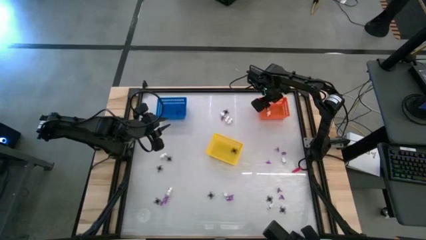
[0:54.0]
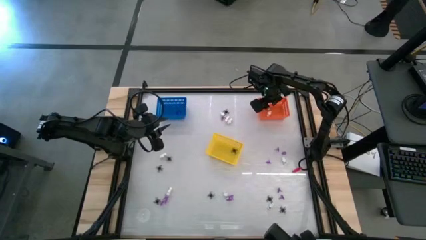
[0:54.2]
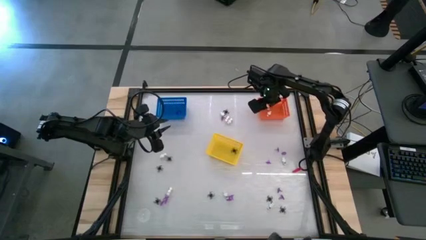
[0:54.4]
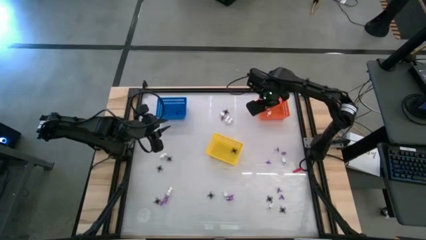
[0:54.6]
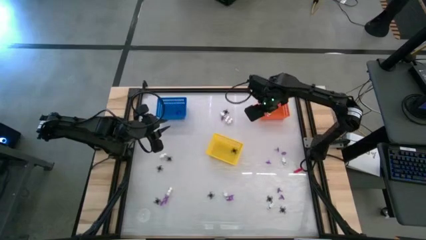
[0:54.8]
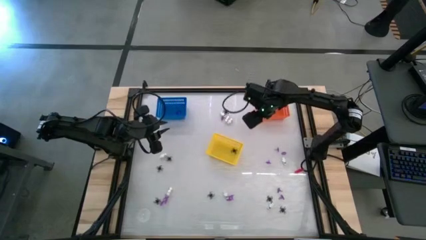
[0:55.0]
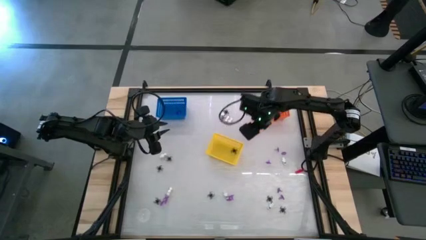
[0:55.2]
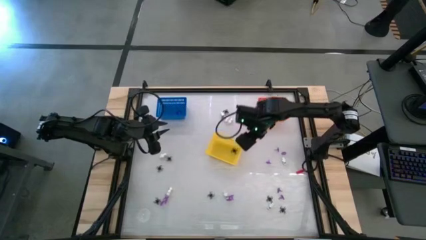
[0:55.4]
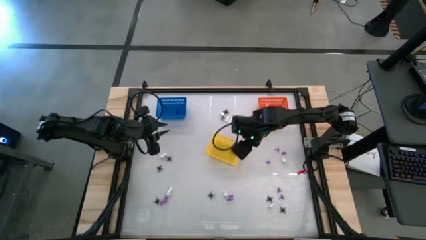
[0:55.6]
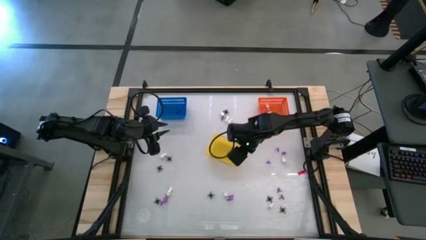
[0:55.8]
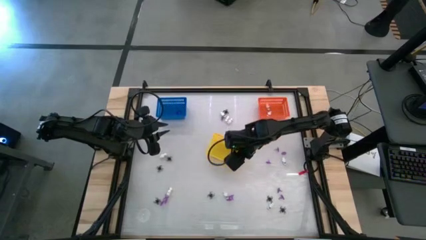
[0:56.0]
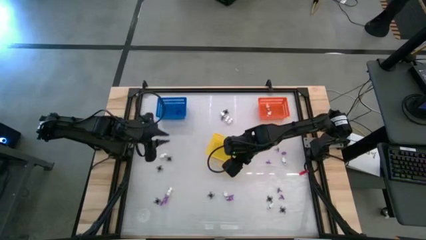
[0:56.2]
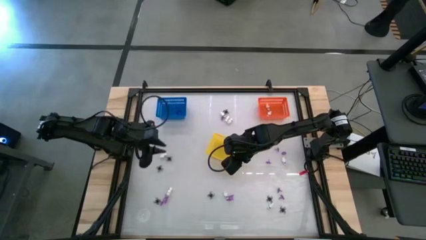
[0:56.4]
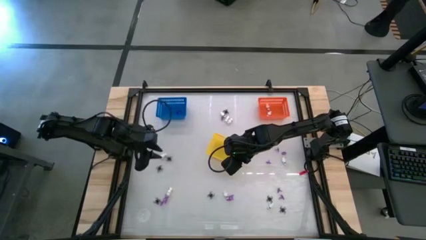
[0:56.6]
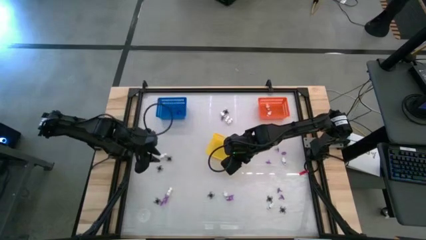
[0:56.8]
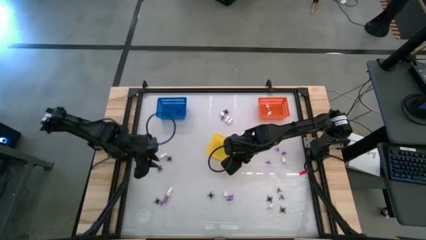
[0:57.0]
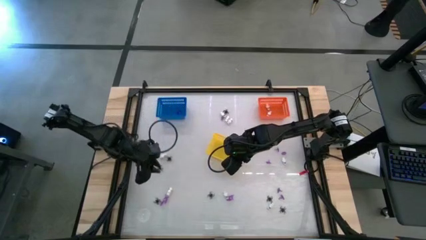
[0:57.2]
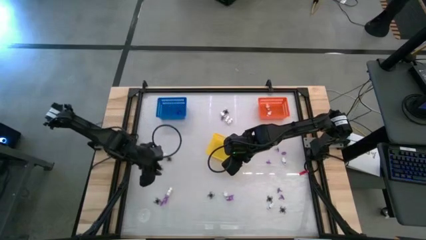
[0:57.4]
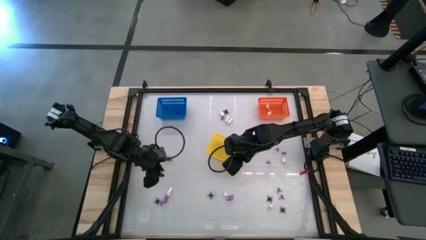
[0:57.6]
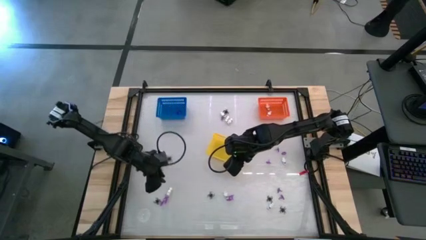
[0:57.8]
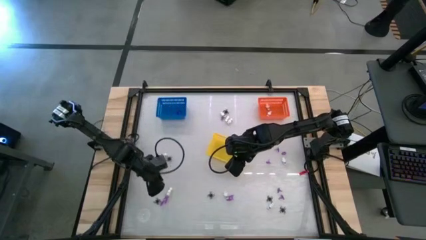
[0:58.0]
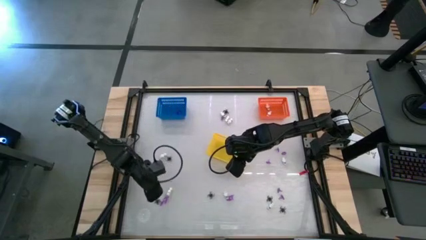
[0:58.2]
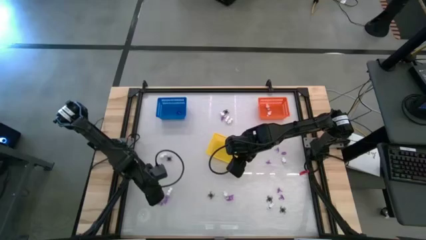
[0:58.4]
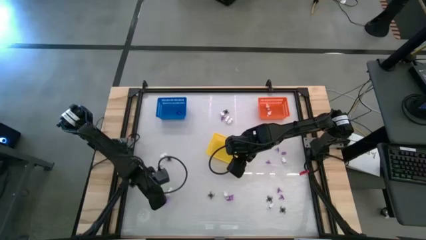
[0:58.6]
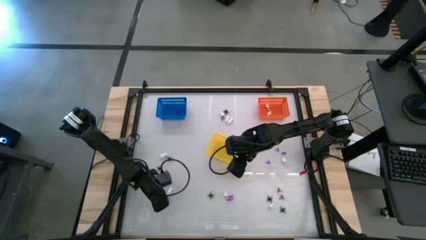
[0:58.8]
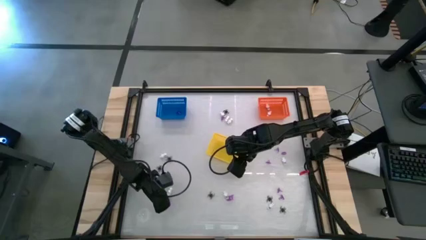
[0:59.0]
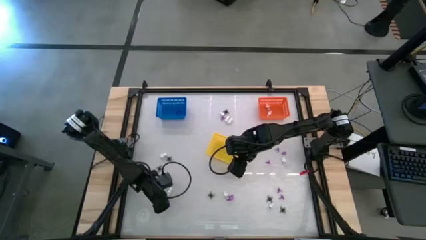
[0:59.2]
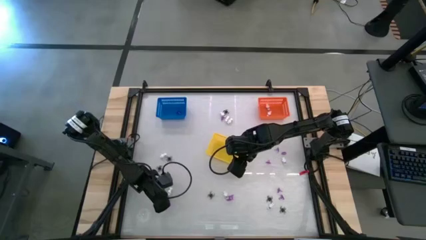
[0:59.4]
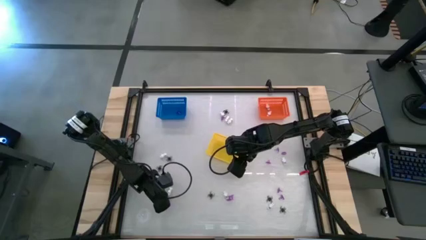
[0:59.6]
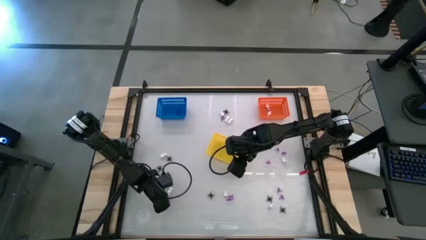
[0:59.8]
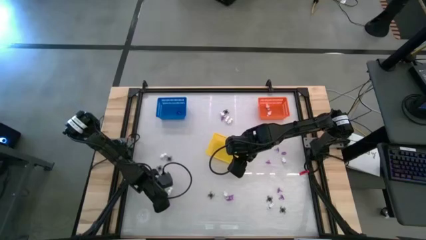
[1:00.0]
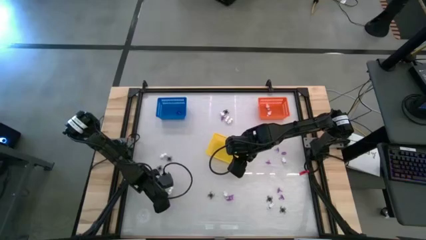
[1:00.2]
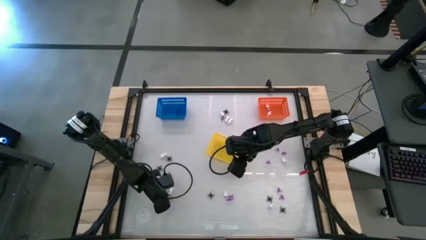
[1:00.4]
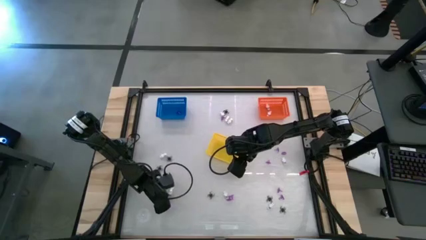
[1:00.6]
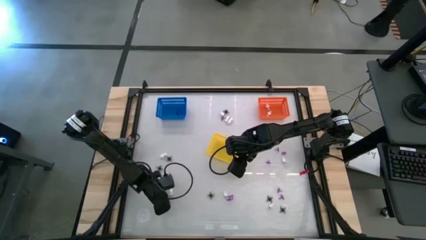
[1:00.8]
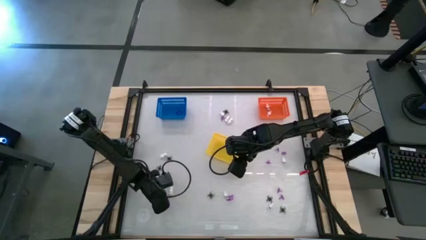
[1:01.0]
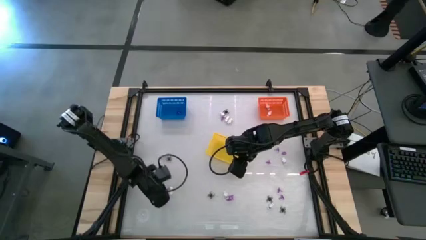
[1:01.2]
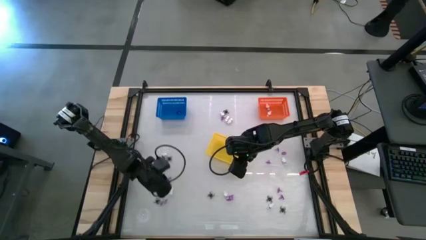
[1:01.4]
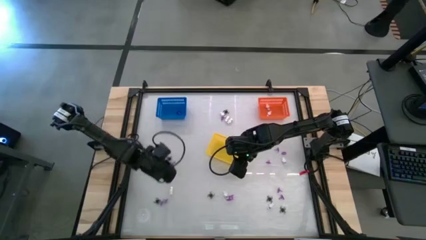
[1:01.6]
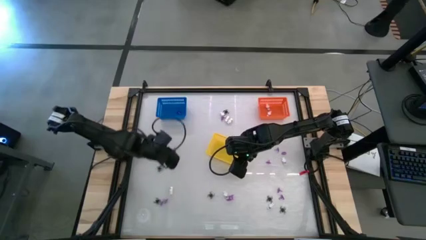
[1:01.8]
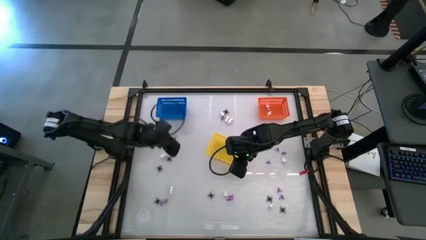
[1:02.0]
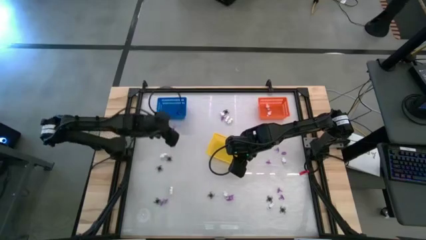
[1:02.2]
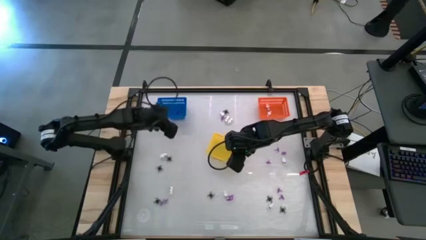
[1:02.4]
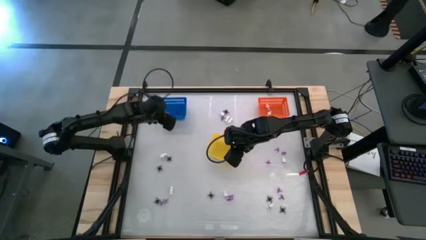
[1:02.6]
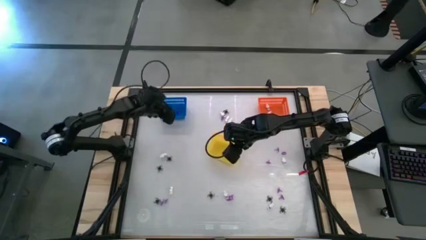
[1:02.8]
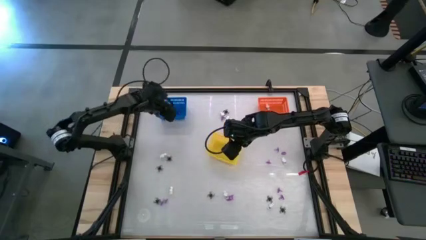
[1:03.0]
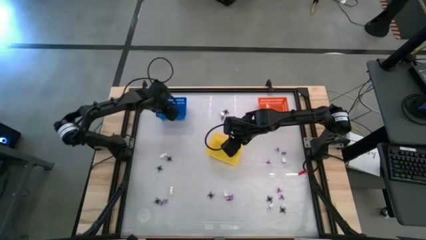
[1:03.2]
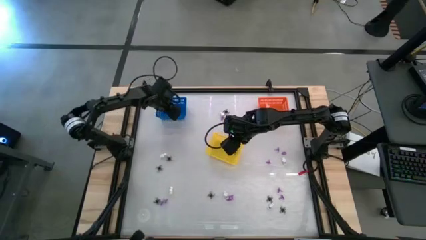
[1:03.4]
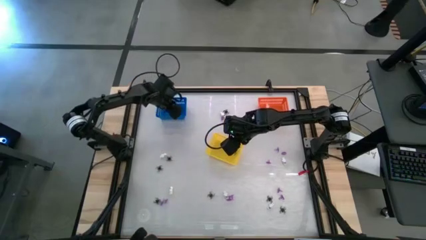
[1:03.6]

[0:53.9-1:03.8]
Task: Sort Halloween decoration
Put the purple witch hat toy into the blue bin

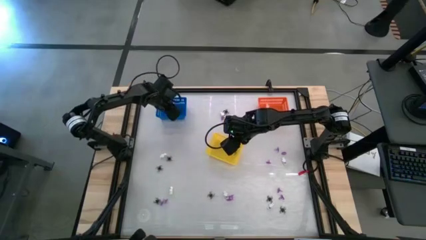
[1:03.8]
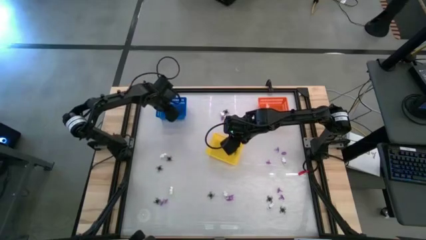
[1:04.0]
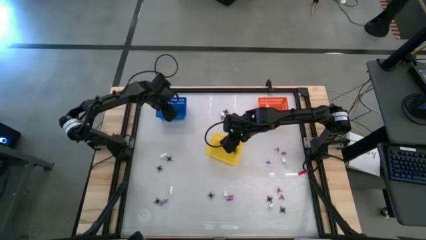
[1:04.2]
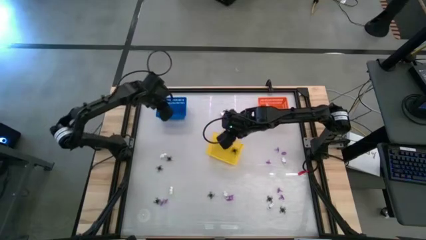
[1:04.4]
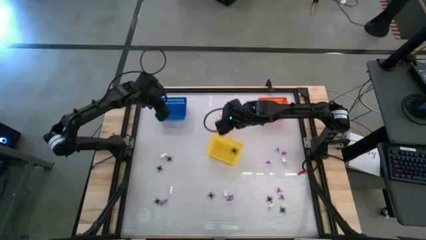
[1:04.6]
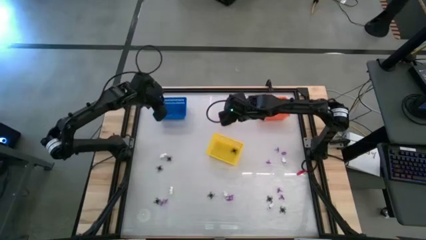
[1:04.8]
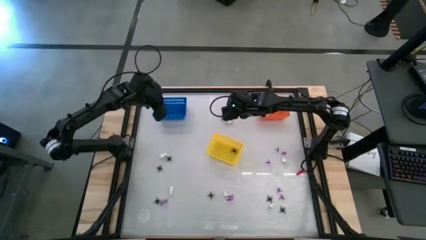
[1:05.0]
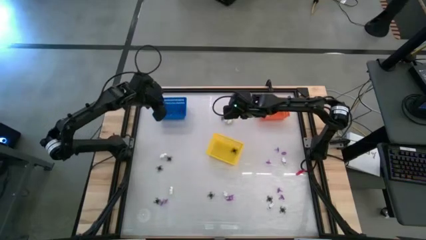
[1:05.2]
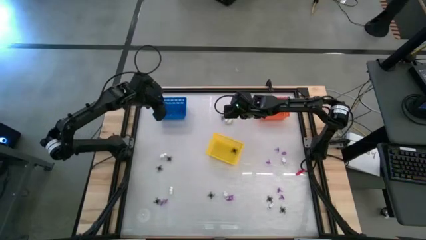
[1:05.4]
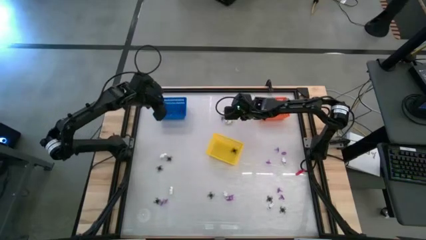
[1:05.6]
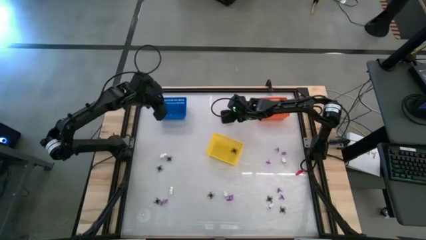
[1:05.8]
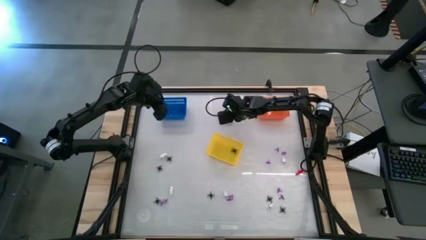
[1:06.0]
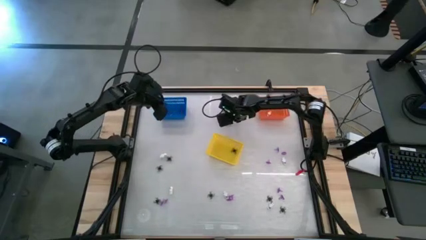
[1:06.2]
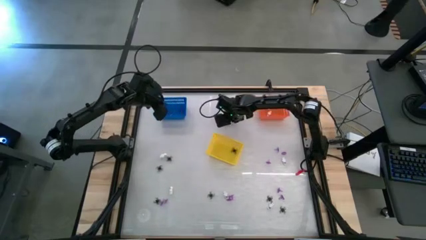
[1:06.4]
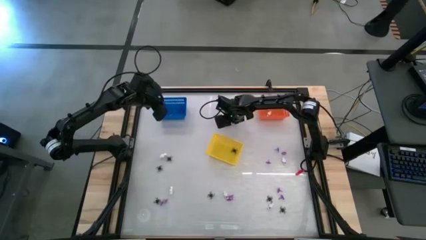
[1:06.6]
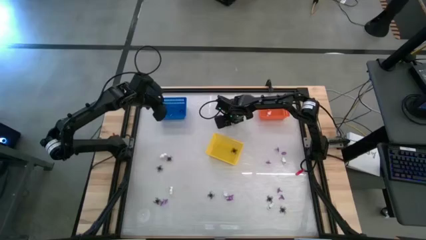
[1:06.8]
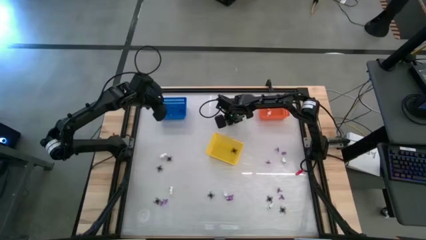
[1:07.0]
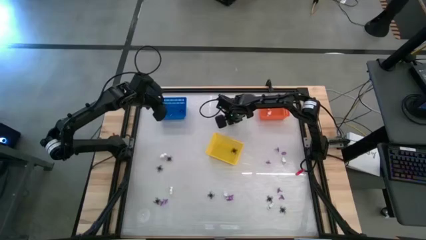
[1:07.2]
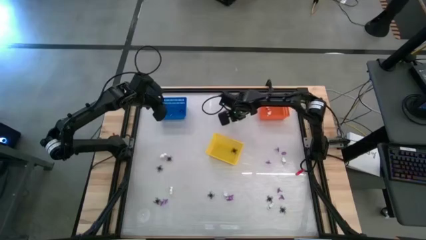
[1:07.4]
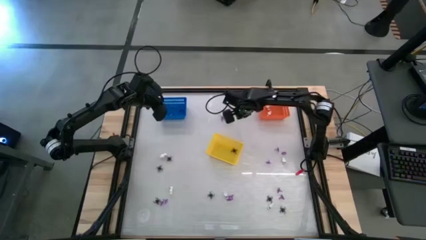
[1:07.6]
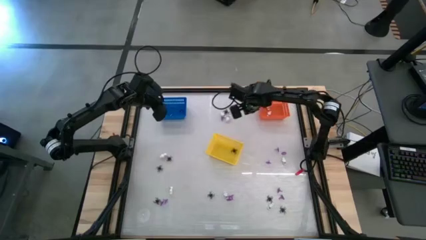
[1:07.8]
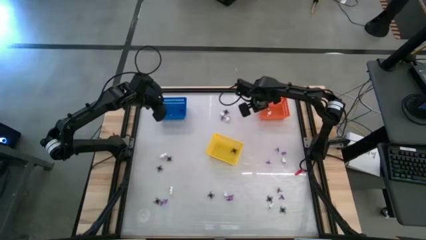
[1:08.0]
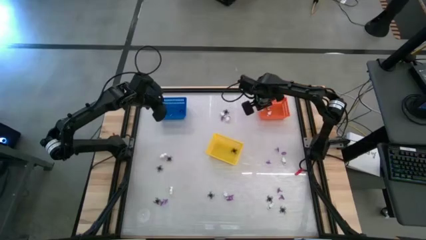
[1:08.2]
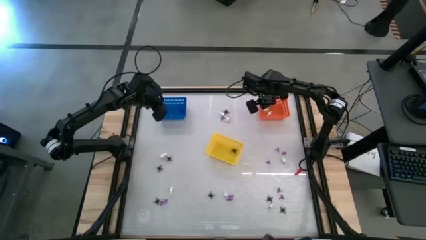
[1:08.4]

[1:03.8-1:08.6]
Put the white skeleton toy into the orange bin
